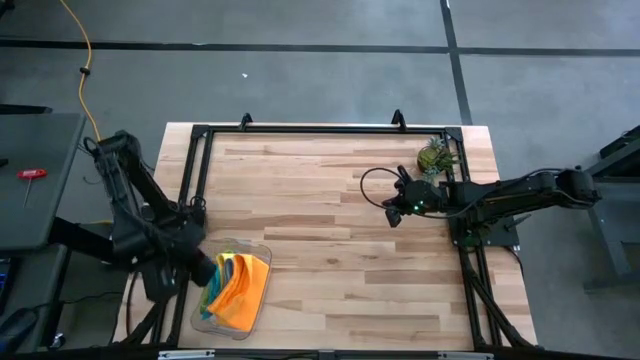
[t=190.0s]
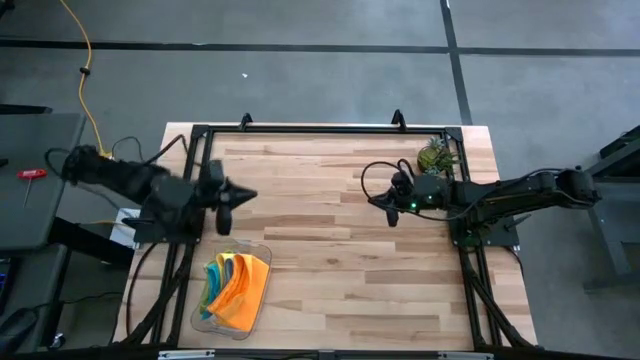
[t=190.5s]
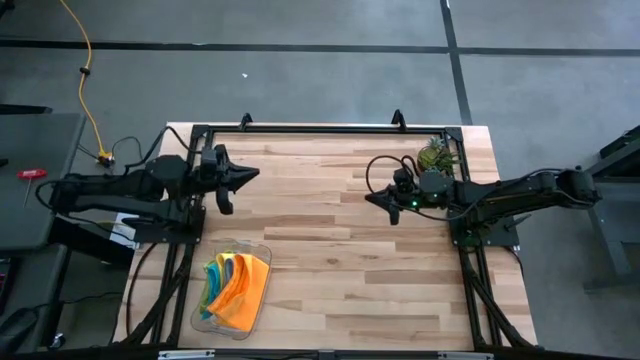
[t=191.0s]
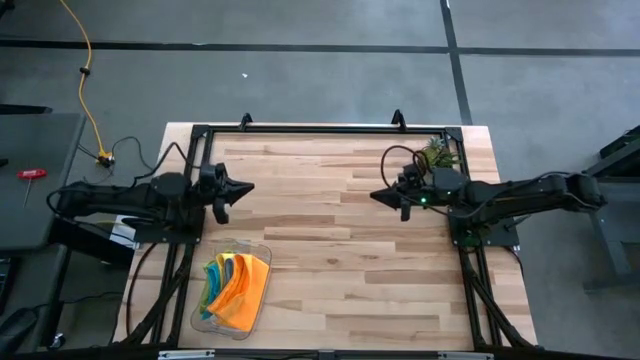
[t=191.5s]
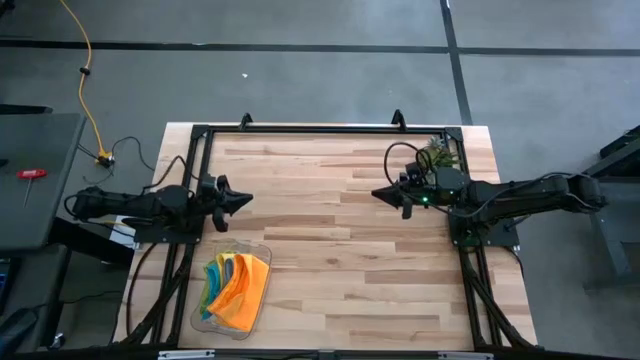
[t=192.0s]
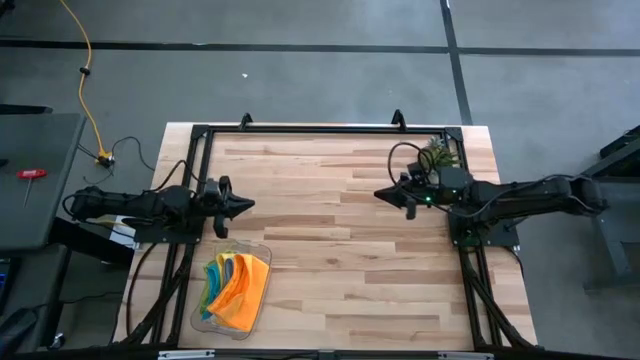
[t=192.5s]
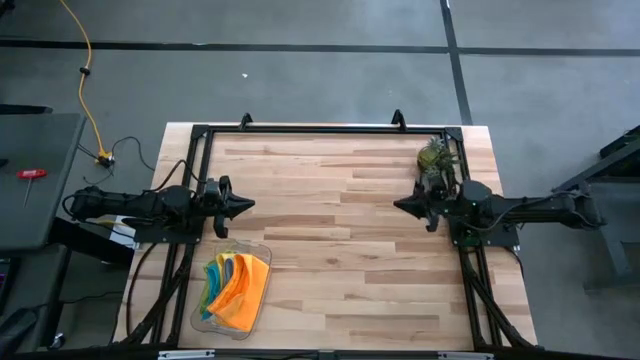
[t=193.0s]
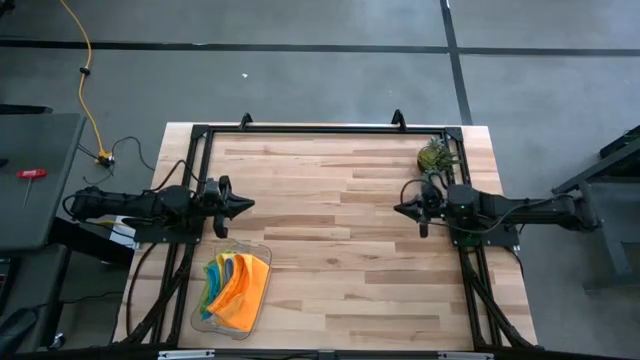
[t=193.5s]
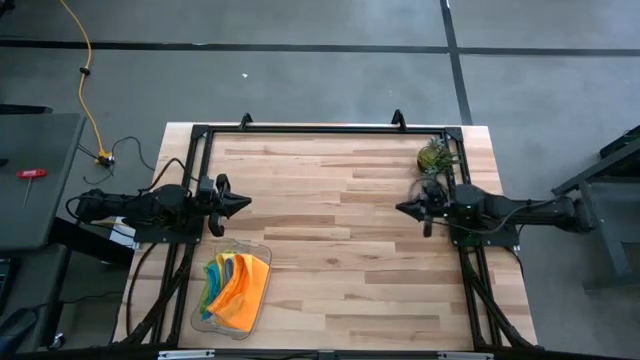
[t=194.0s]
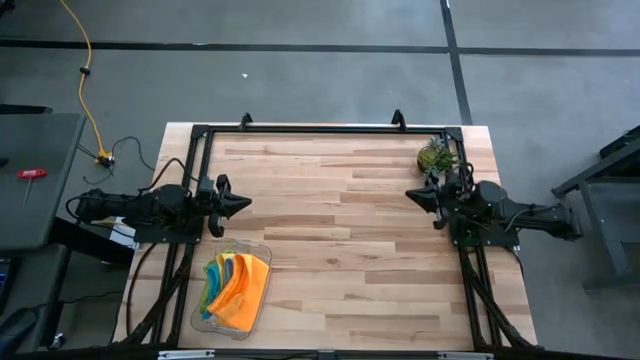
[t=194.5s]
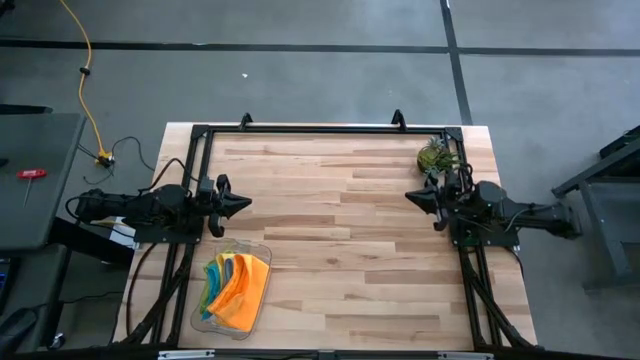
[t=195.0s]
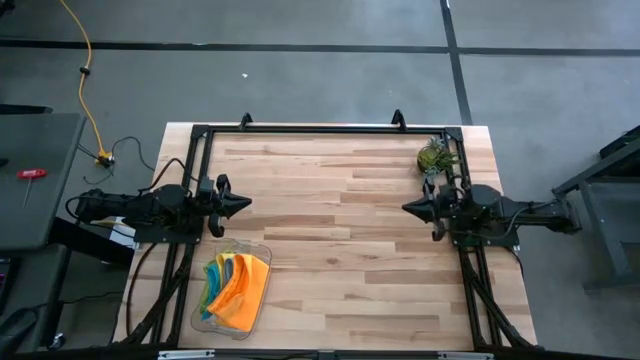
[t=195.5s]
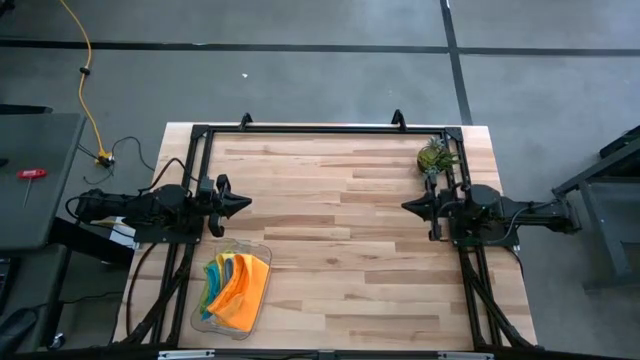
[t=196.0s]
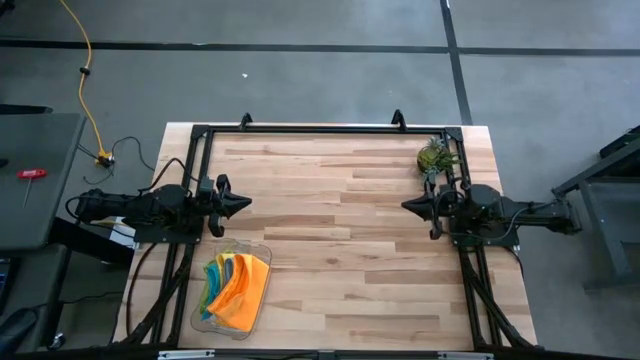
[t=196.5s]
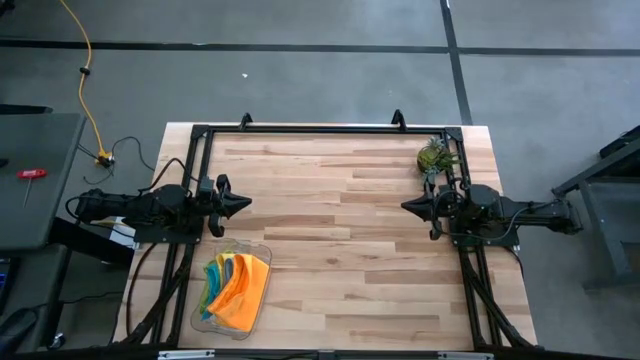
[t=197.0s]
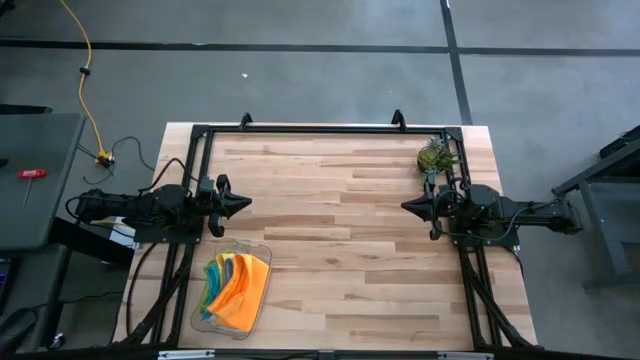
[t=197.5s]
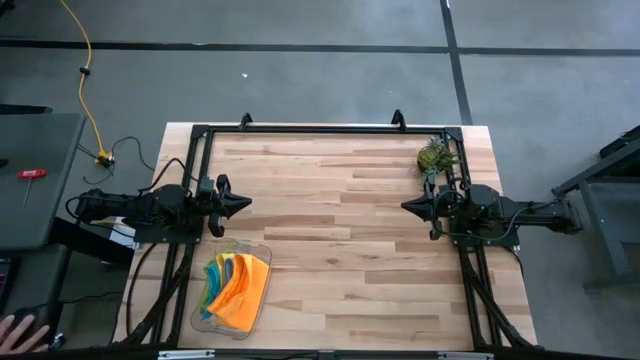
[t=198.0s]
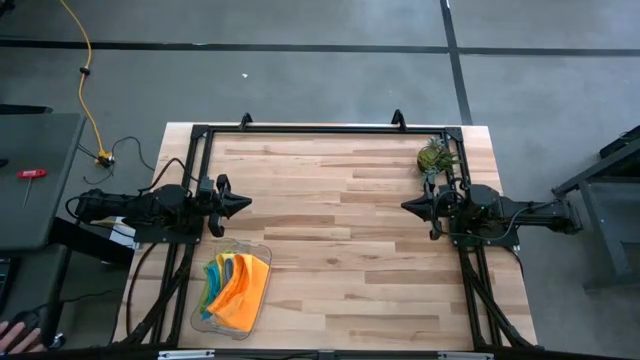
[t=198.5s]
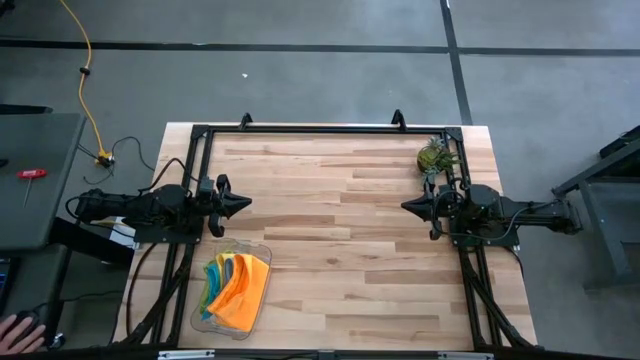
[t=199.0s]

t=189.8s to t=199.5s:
Task: Fold microfiber towels
Return to Home Position

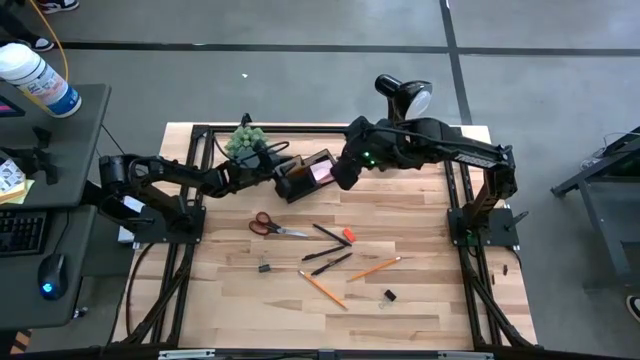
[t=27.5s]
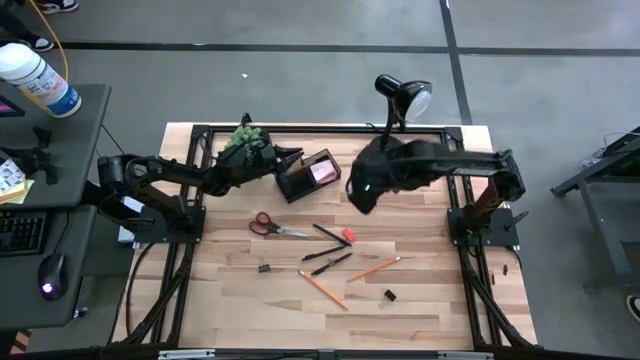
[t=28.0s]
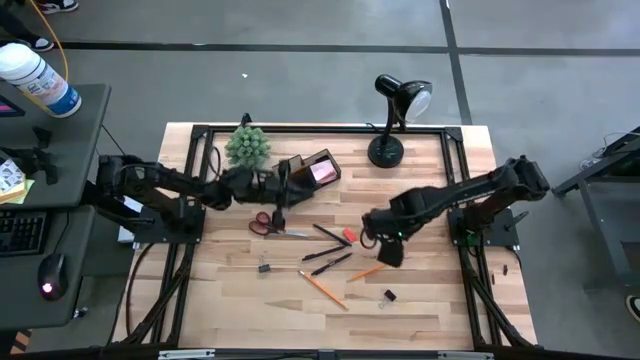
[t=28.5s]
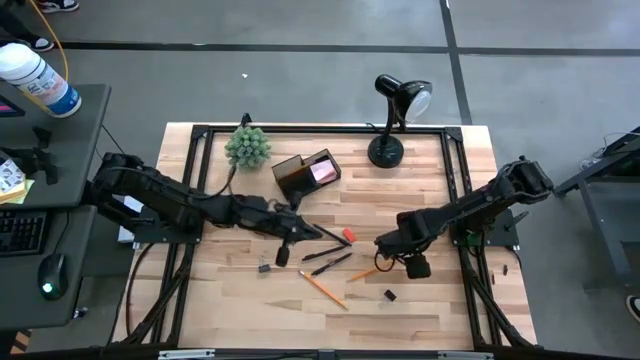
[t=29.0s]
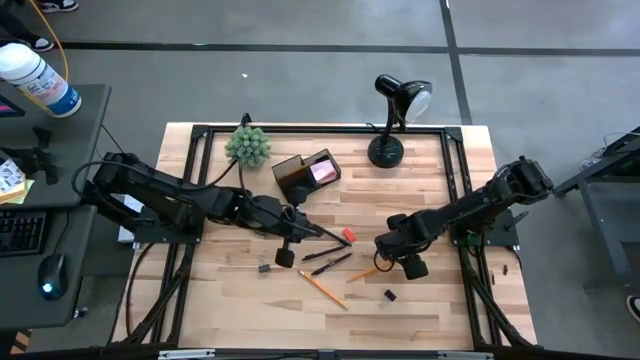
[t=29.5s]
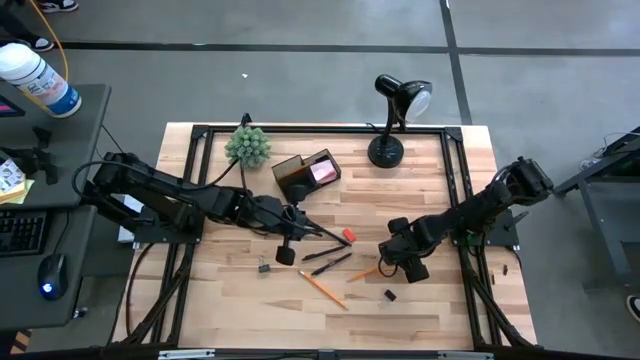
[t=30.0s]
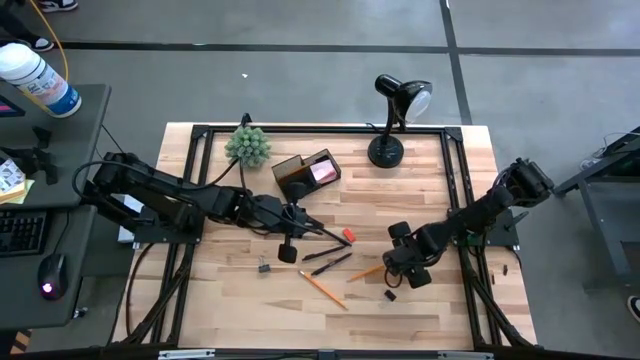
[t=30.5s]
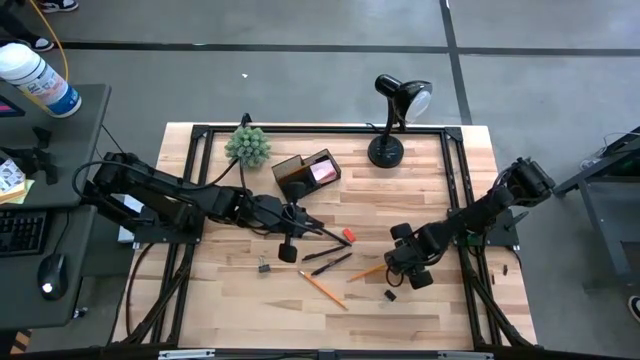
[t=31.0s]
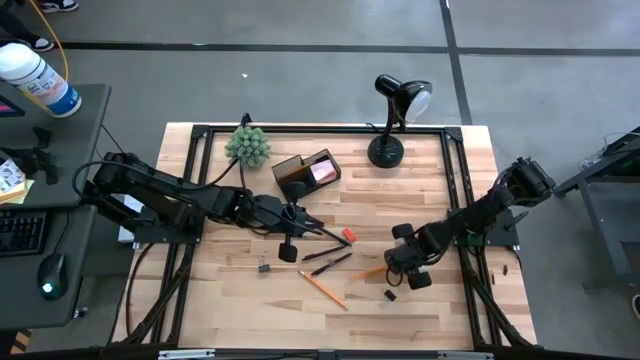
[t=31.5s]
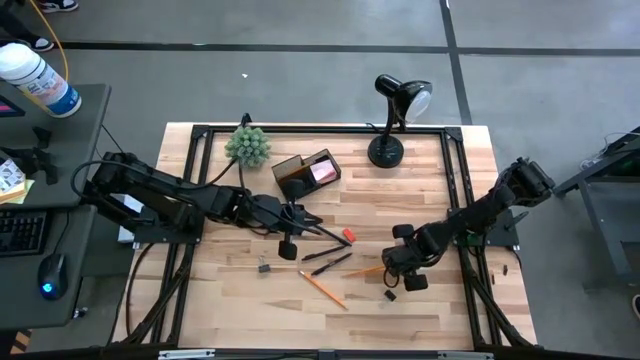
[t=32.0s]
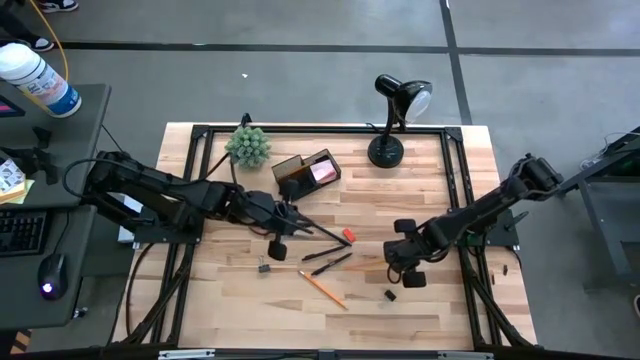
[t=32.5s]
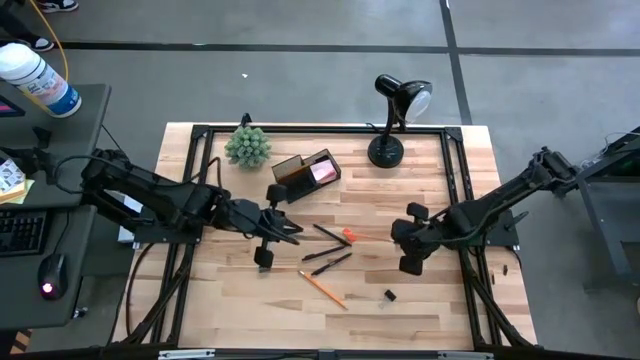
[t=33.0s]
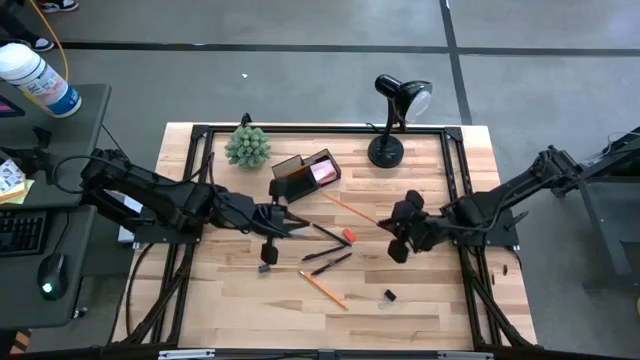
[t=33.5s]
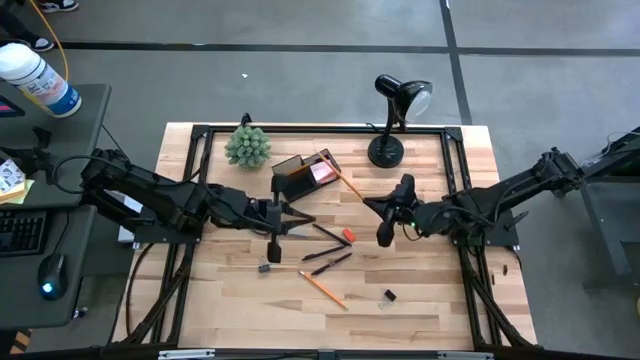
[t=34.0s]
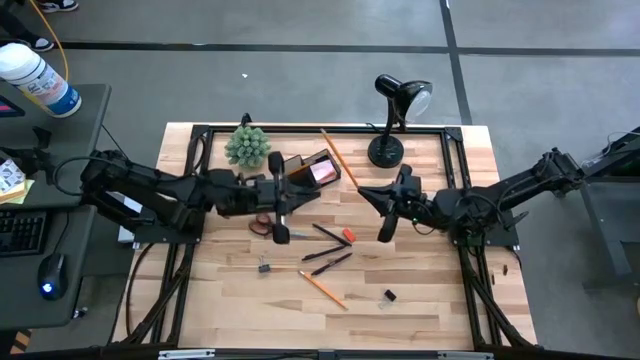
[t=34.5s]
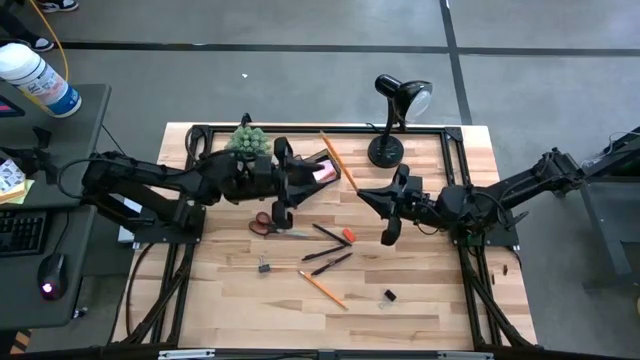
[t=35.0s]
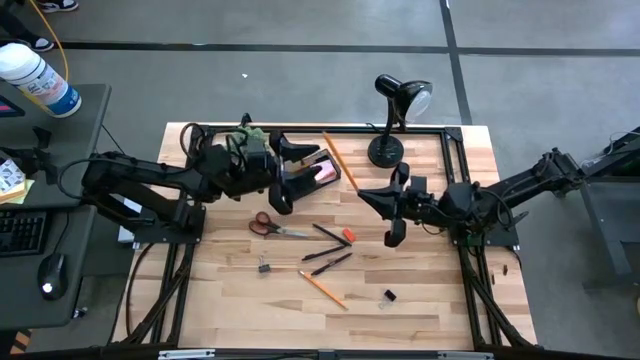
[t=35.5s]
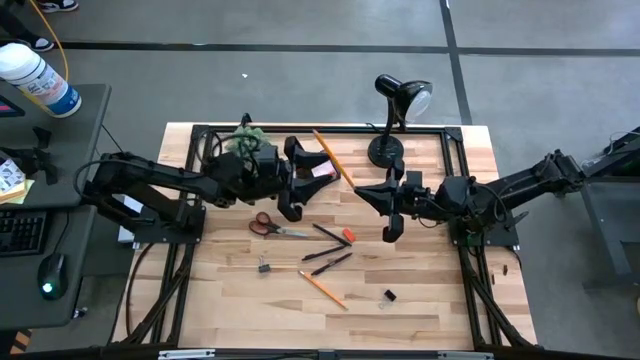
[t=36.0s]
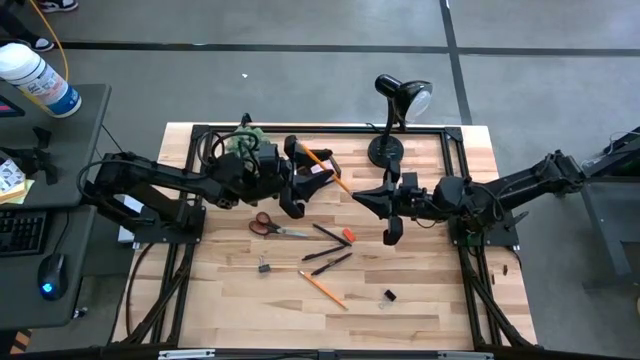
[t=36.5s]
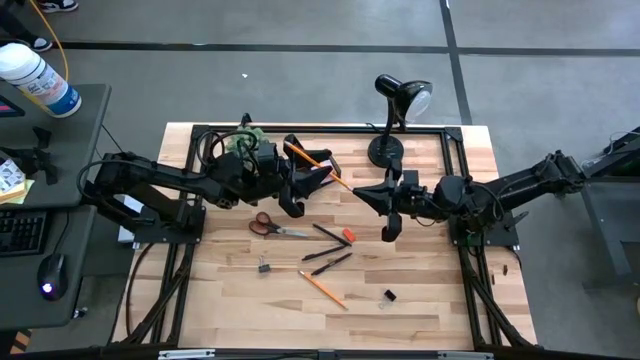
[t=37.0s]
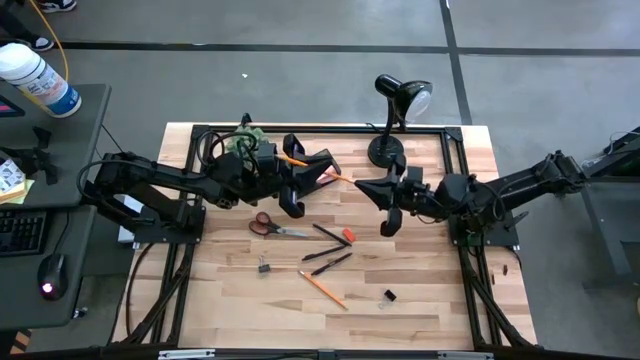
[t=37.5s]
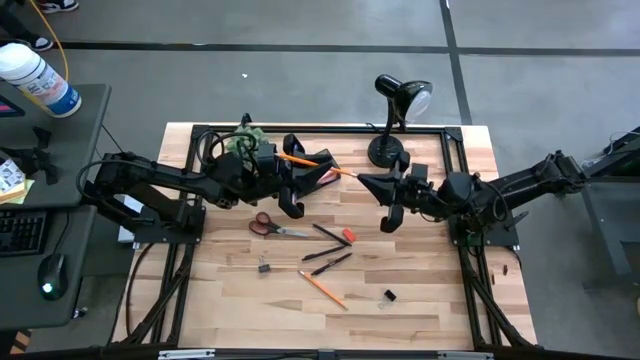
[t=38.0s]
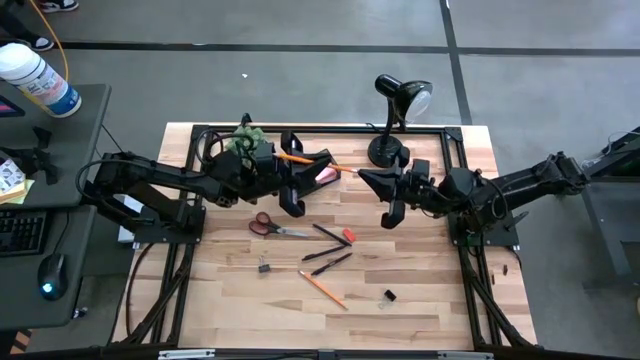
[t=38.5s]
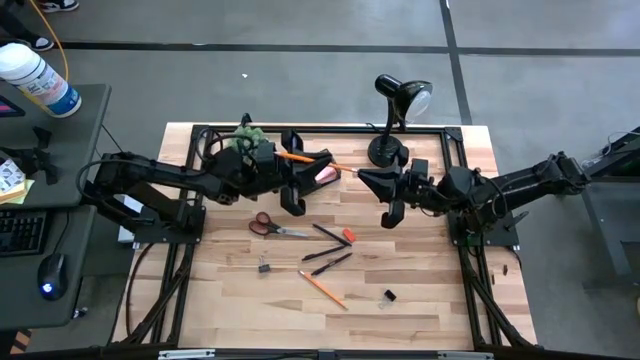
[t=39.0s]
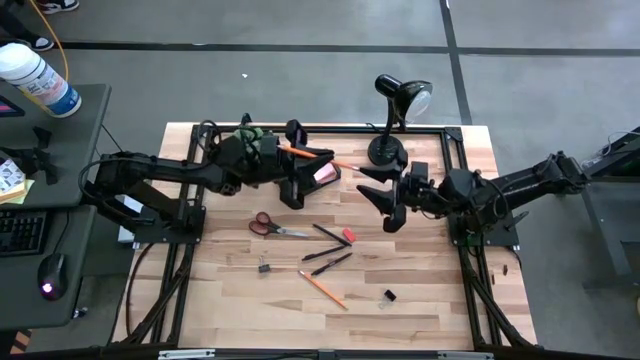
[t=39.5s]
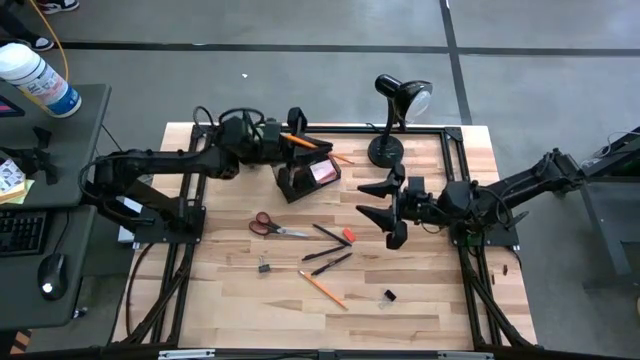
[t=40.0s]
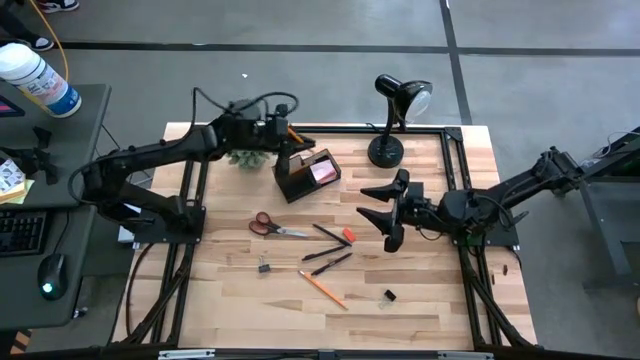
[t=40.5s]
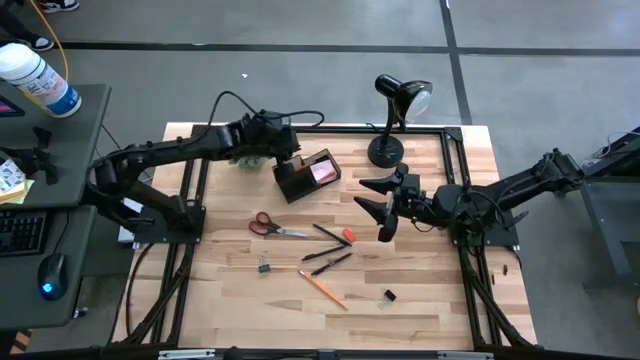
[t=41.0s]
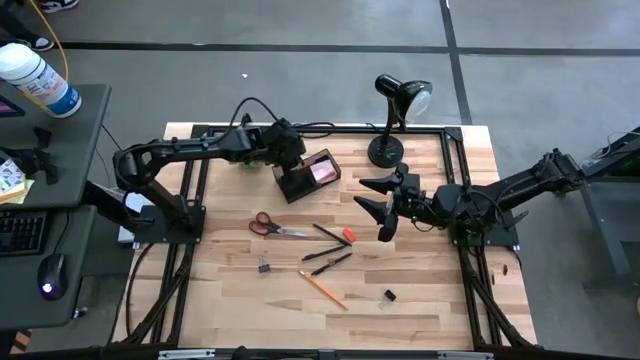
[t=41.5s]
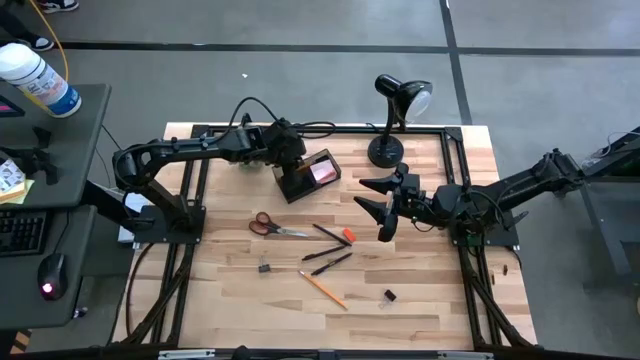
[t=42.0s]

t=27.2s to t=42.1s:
Task: Pick and place office supplies into organizer
Put the right orange pencil into the black desk organizer
